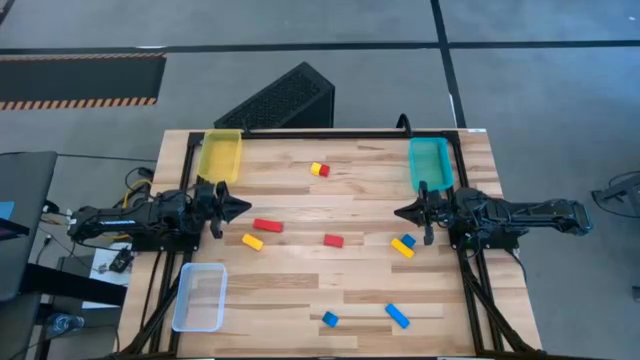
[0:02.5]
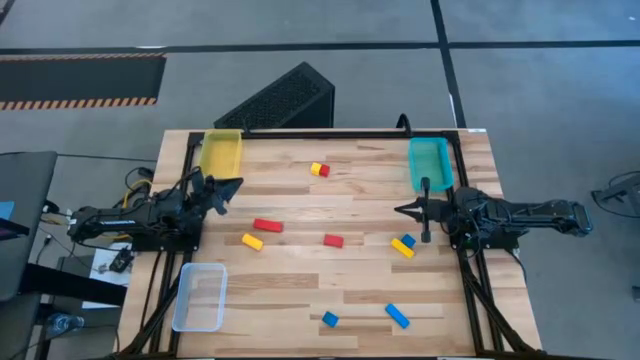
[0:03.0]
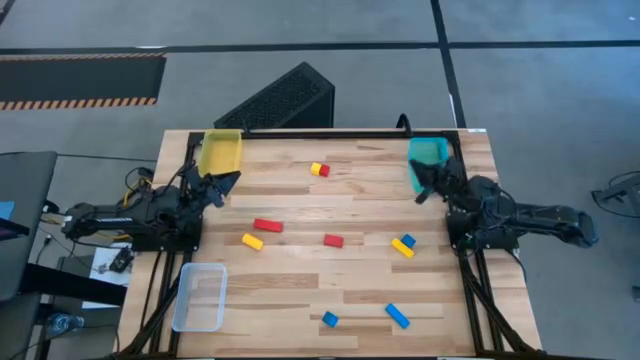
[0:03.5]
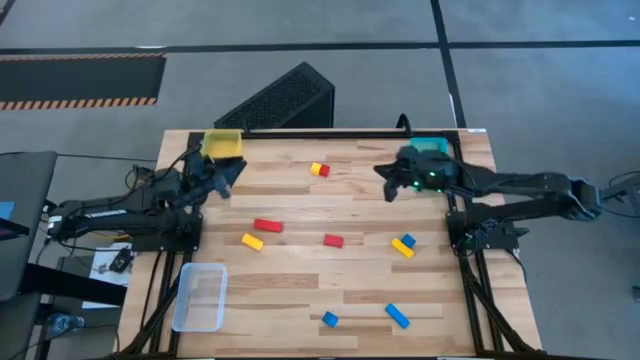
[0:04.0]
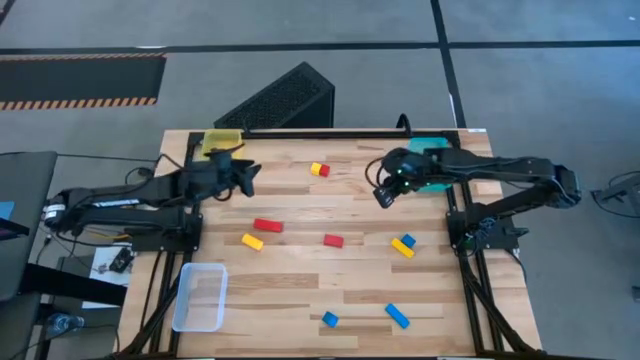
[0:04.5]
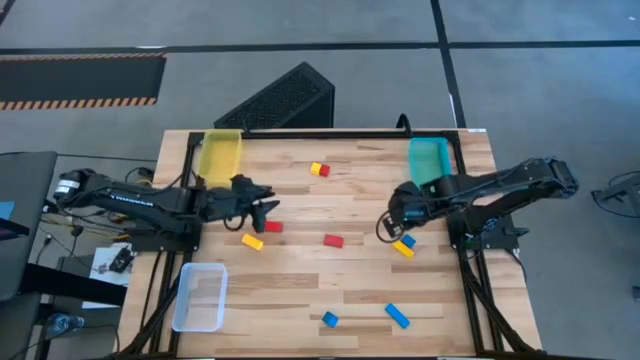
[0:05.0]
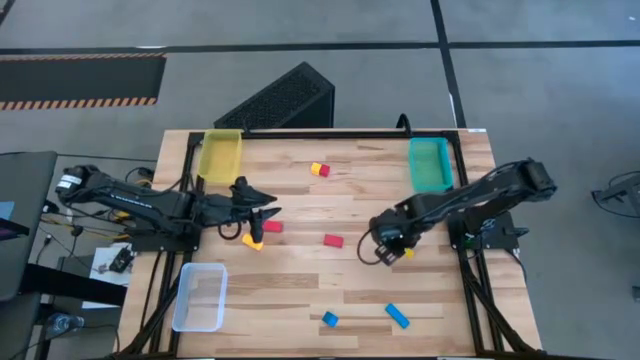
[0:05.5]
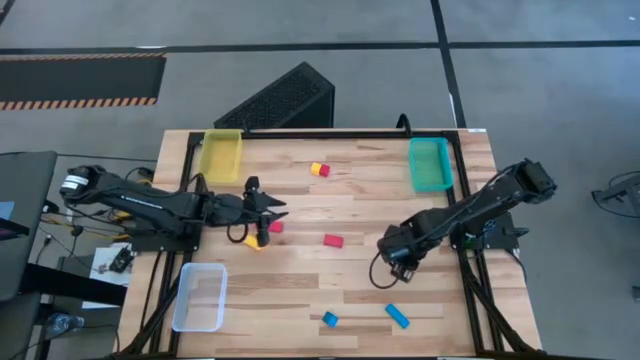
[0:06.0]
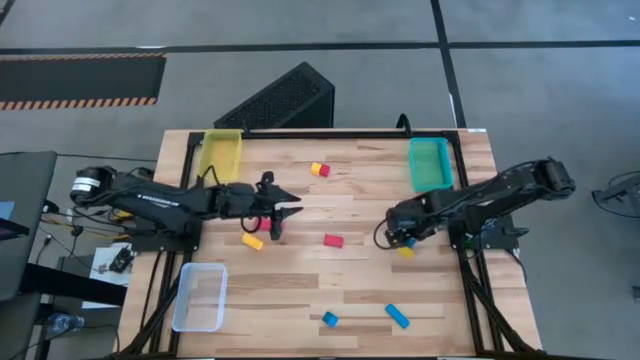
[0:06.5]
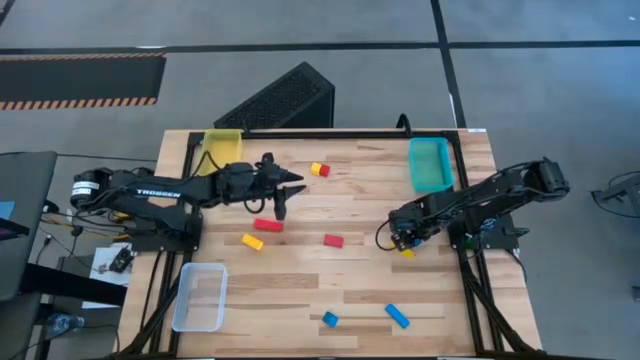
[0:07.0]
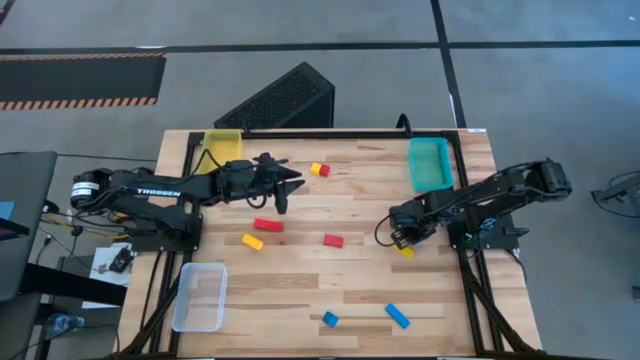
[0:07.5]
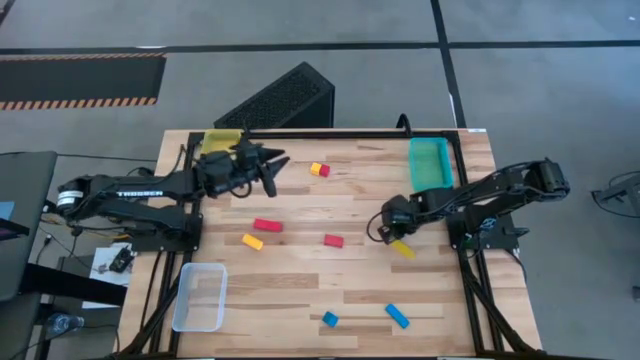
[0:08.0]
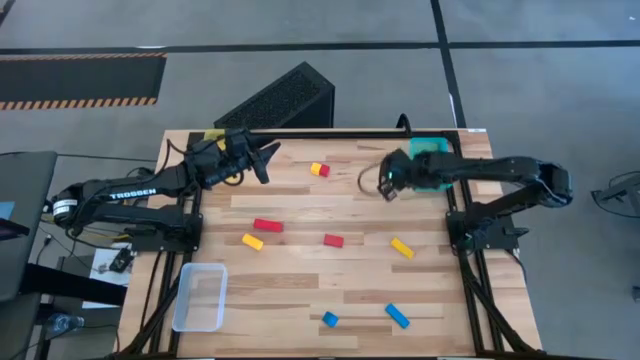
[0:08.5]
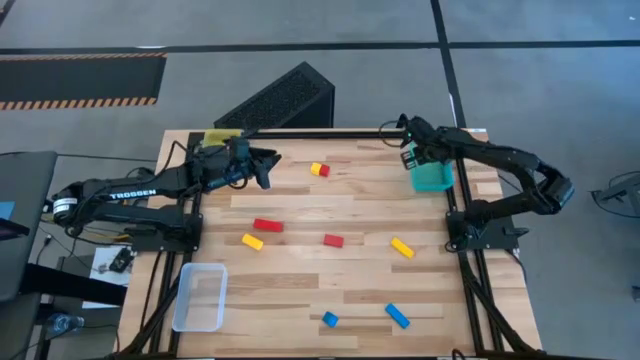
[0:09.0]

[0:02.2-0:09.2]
Task: Sort & place blocks by color
Put the blue square wooden block into the green bin

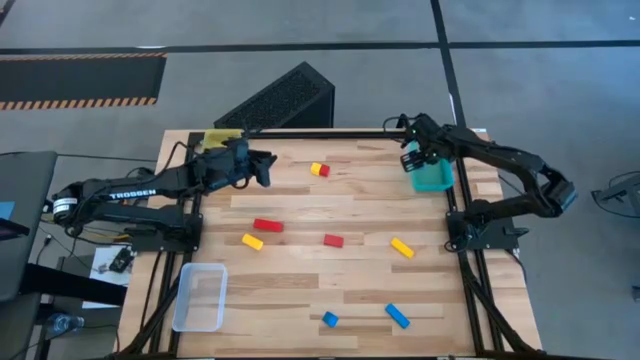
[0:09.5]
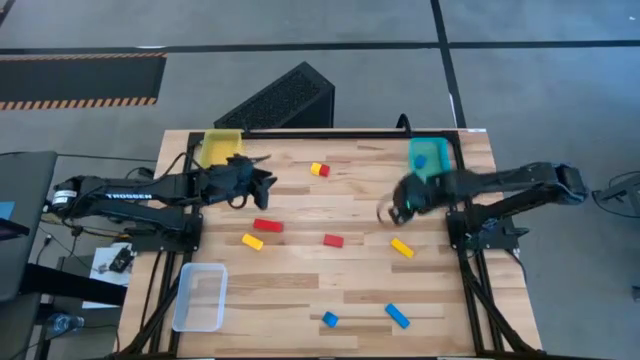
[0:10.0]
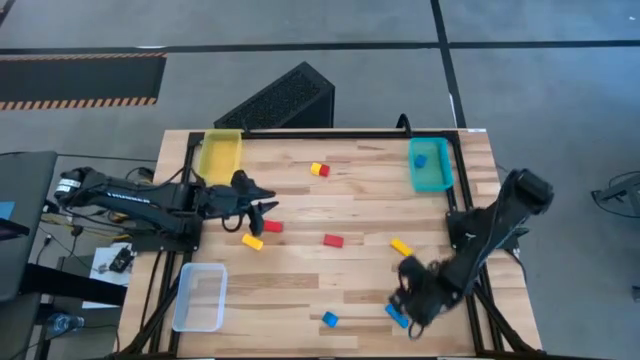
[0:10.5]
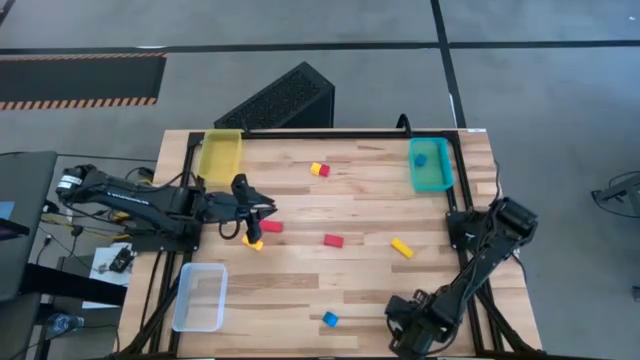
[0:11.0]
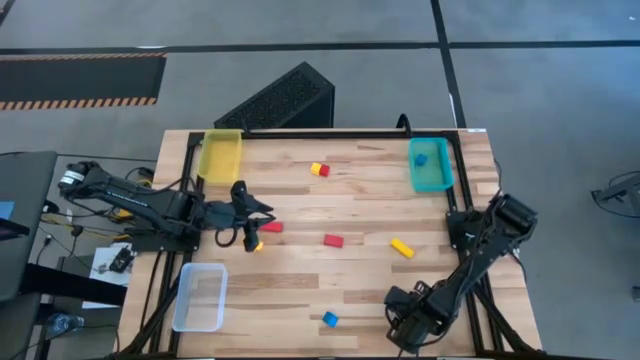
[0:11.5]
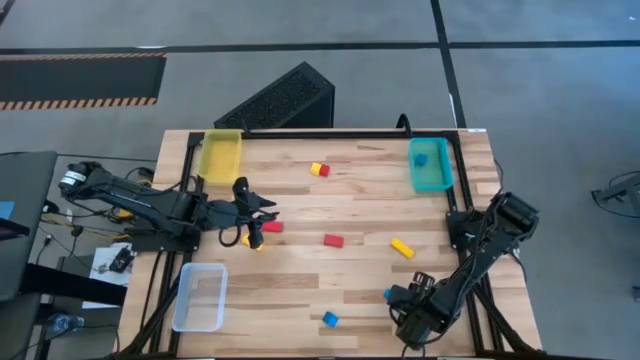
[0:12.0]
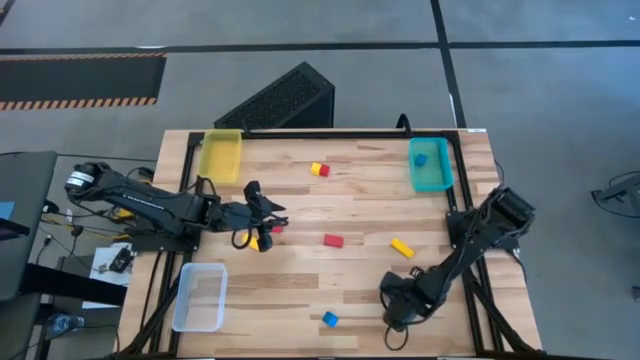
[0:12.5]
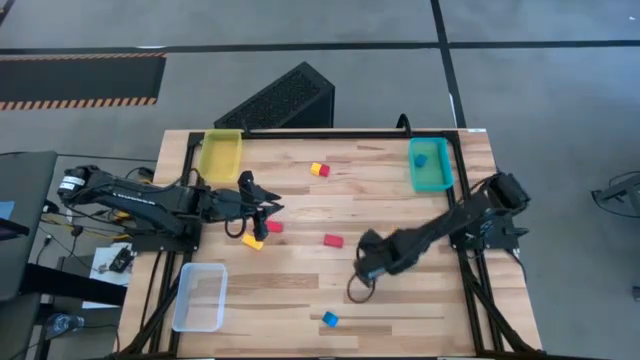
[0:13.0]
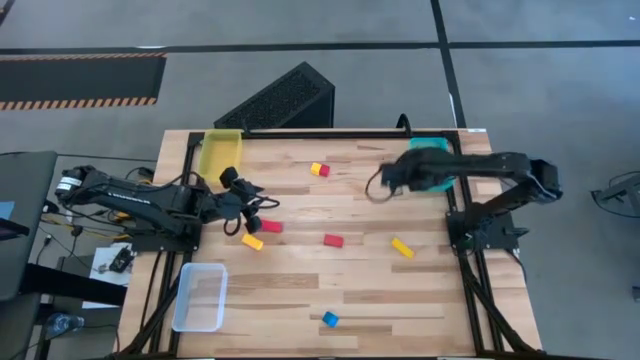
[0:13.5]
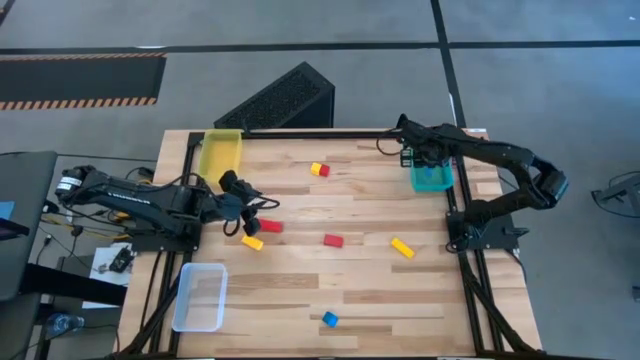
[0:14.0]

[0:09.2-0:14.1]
Put the blue rectangle wooden block into the green bin

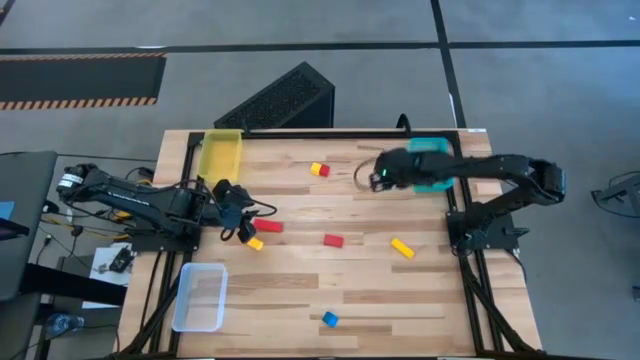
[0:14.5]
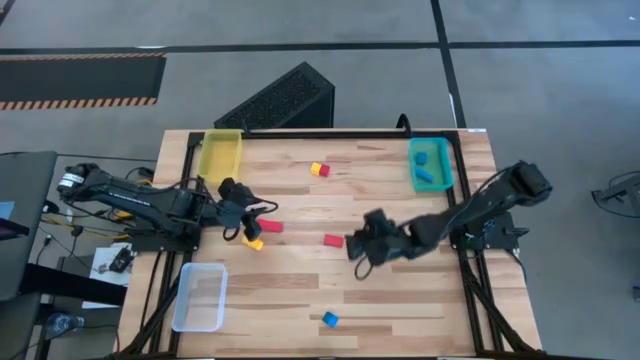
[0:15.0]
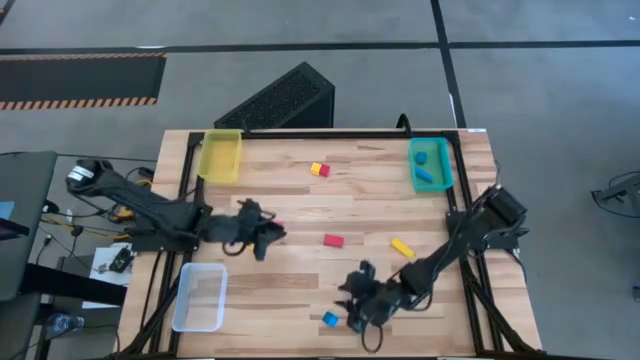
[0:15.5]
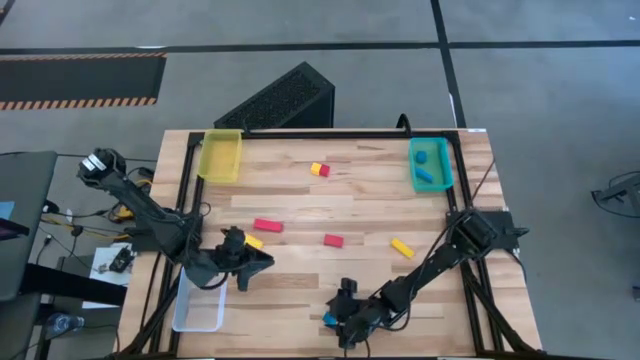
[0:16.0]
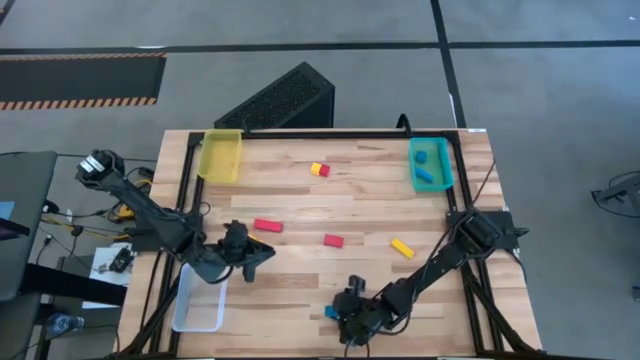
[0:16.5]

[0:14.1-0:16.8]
Put the blue triangle wooden block into the green bin

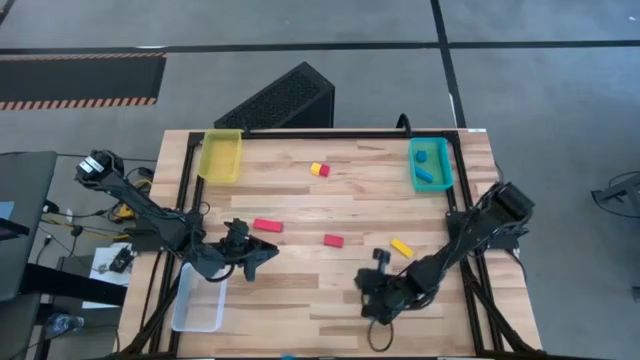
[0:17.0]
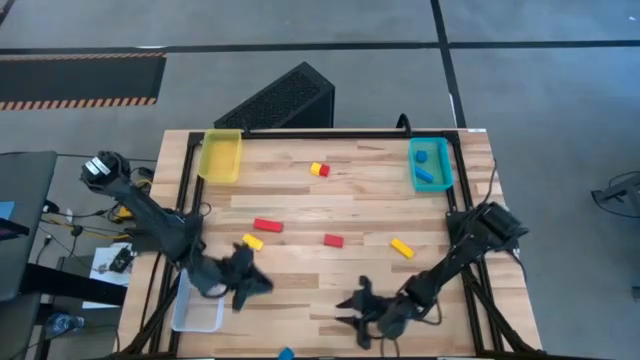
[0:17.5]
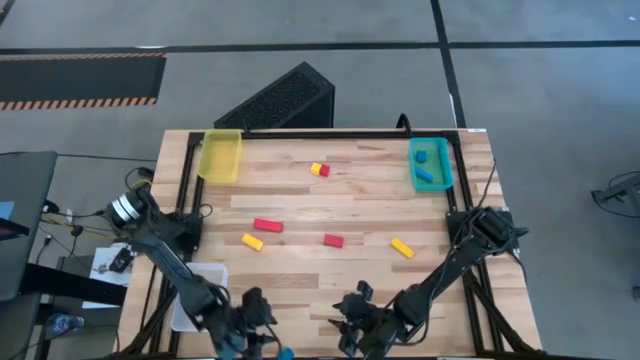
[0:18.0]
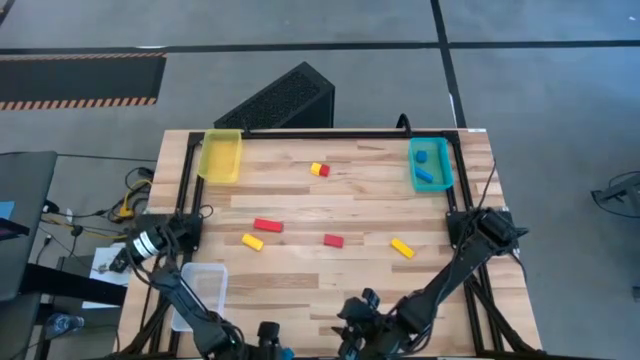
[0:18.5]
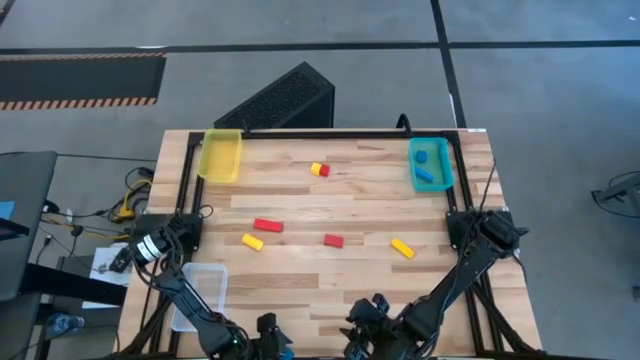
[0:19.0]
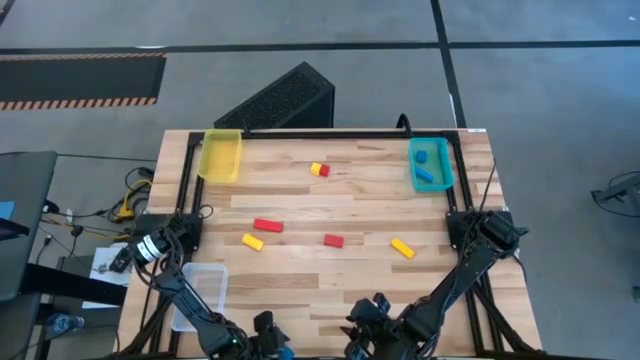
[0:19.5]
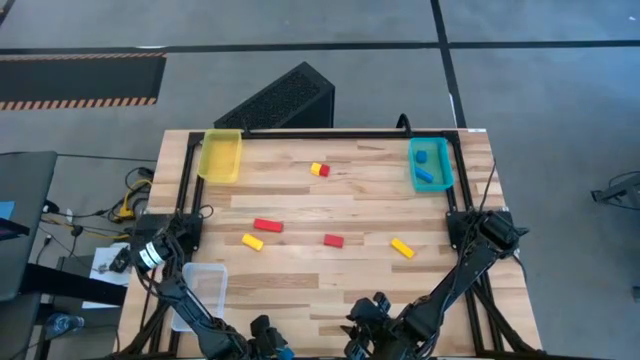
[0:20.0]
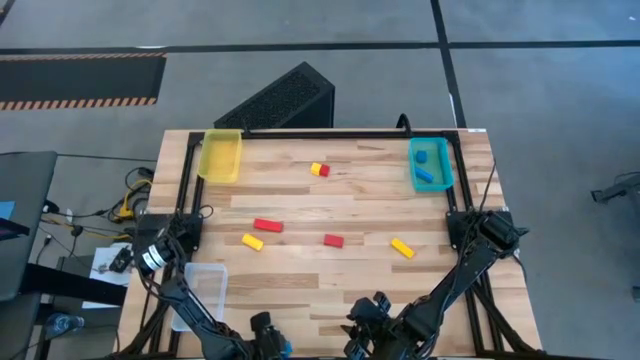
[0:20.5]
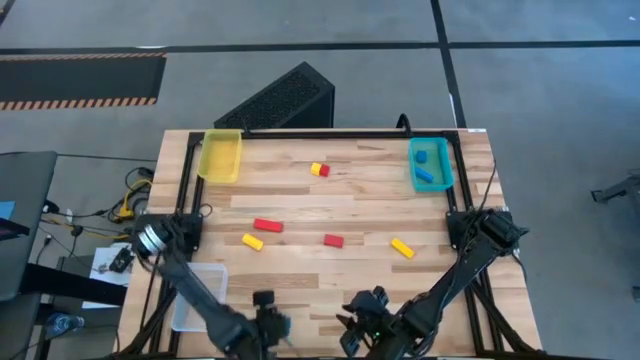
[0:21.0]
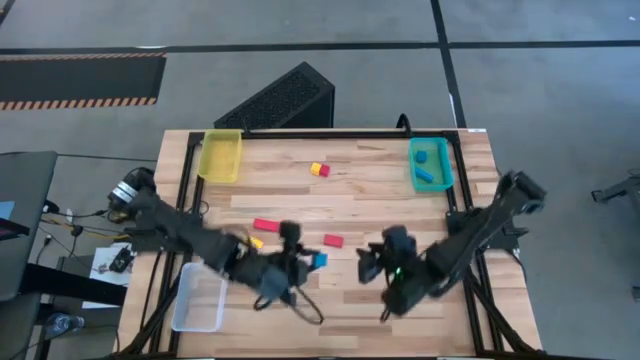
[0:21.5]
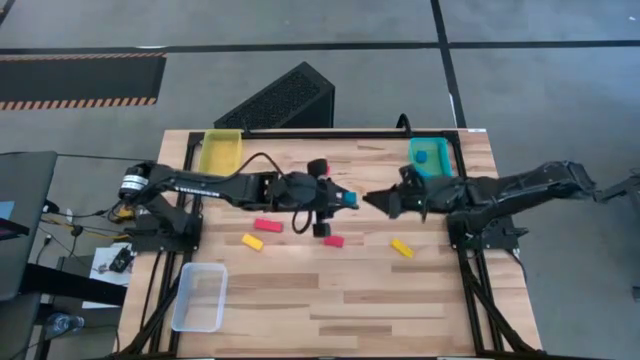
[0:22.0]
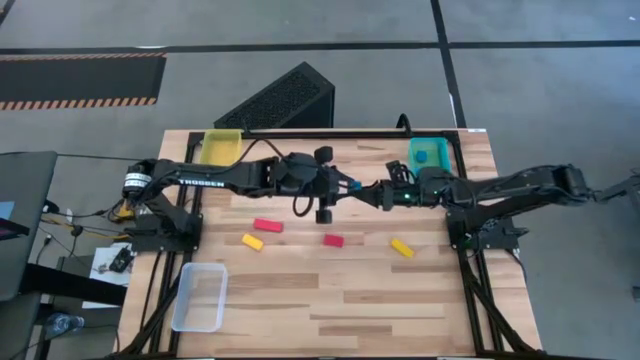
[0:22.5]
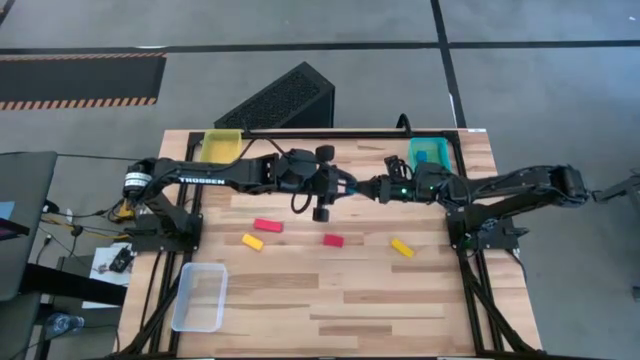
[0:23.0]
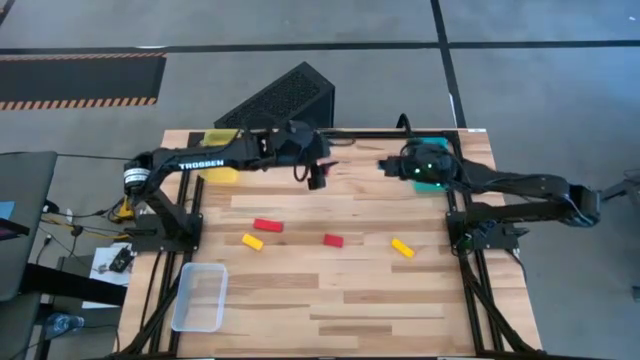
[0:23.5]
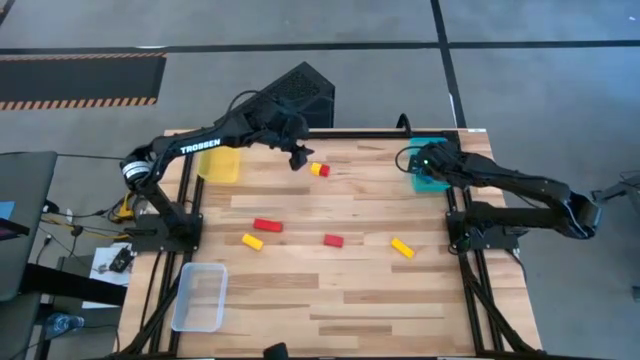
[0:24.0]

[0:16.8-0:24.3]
Put the blue triangle wooden block into the green bin
